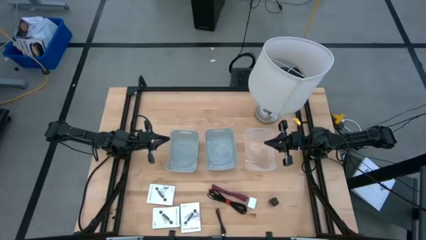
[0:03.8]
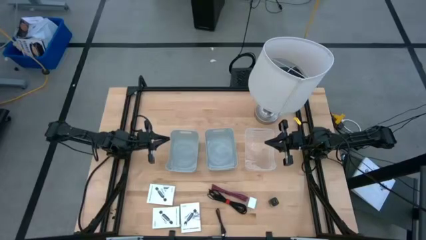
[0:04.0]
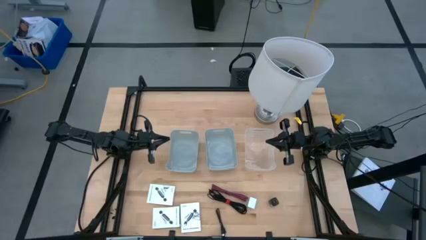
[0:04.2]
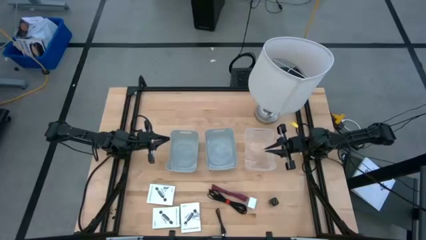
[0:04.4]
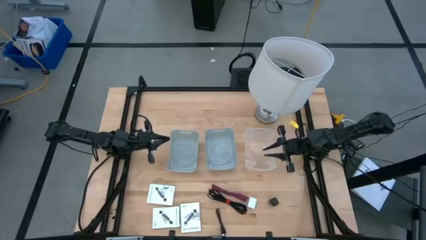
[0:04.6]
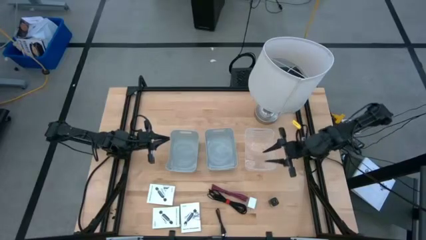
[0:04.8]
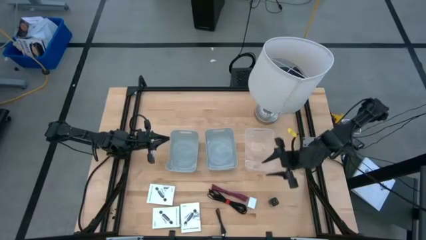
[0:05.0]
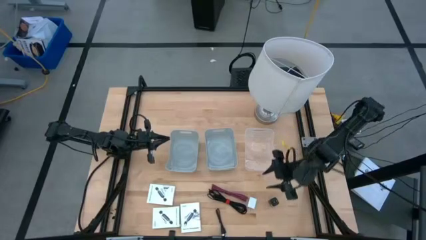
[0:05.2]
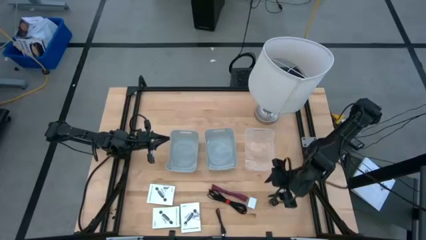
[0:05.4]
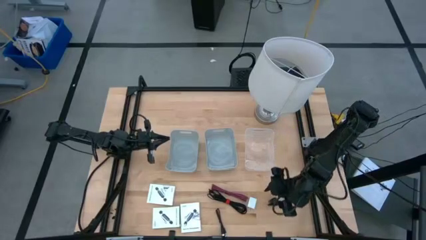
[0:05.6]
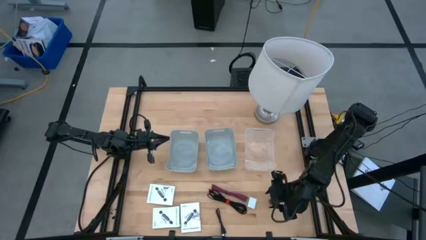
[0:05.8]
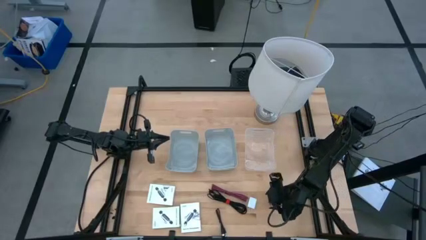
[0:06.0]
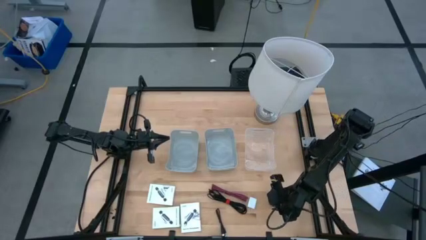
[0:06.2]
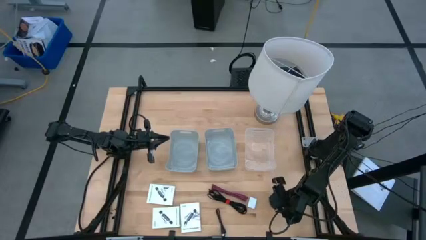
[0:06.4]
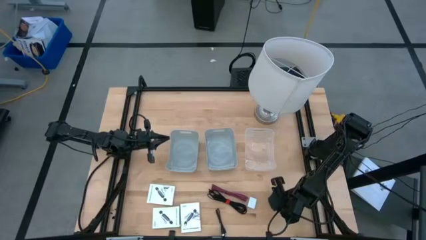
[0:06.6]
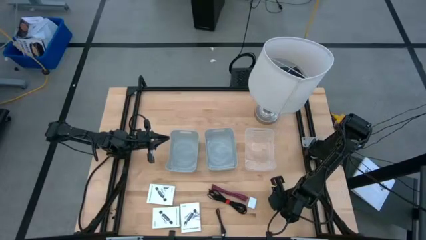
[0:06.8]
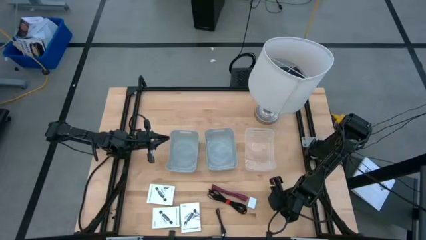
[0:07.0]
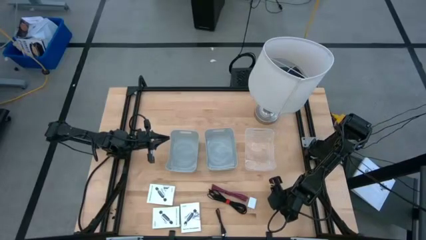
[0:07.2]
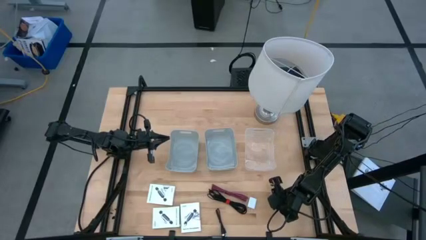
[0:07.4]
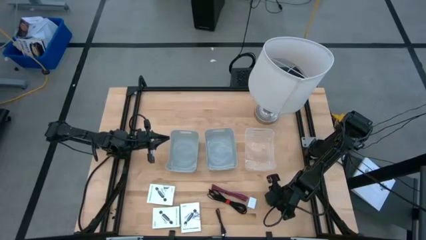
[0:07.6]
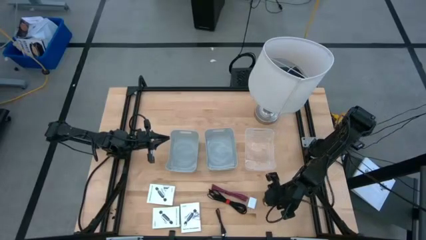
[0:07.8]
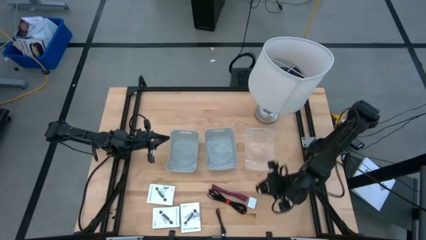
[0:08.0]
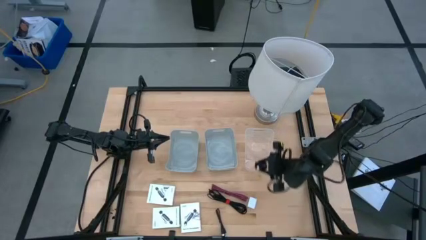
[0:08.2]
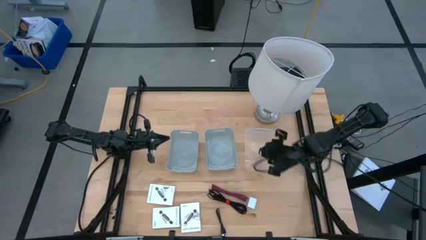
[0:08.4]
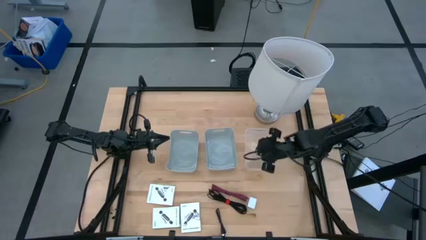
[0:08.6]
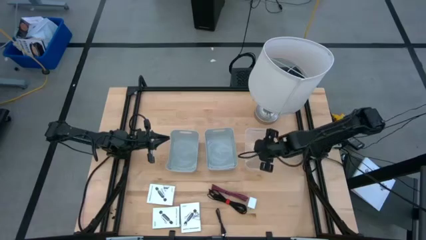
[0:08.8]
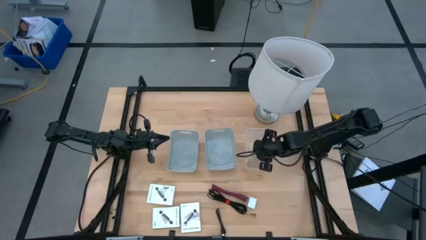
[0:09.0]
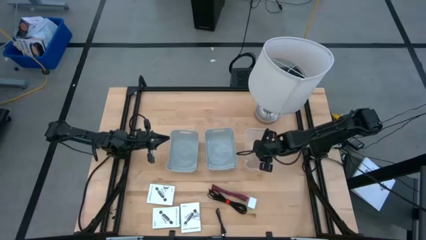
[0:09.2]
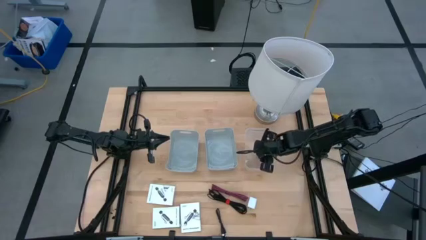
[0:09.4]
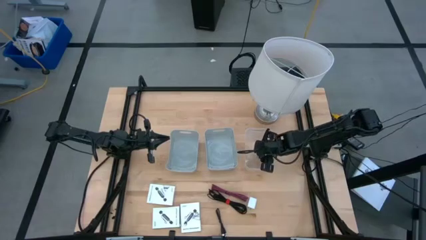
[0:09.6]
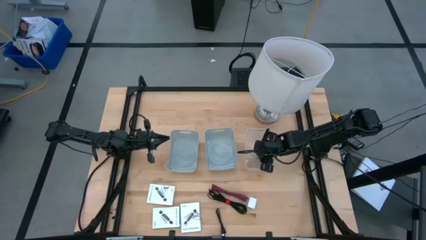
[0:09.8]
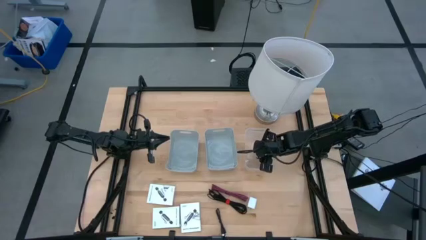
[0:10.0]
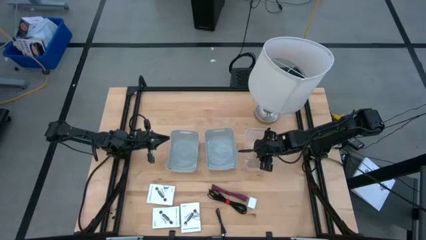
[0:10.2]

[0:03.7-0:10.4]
Task: Pick and place items into bin
Put the black charger adapter into the transparent bin

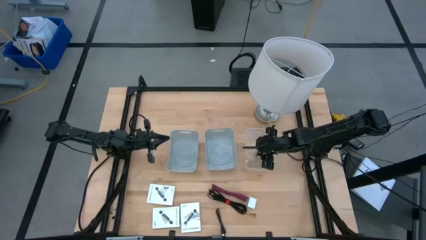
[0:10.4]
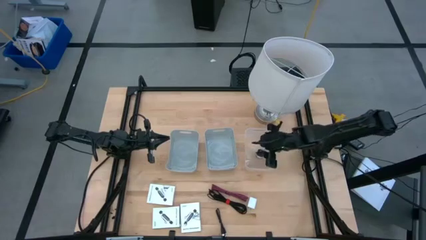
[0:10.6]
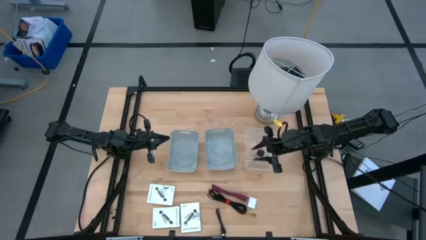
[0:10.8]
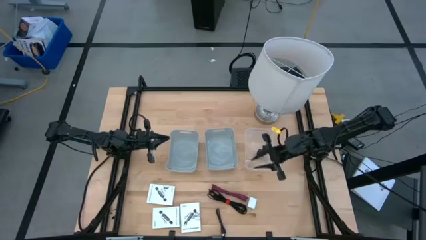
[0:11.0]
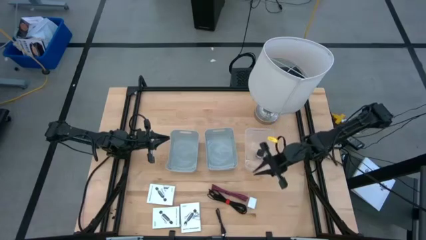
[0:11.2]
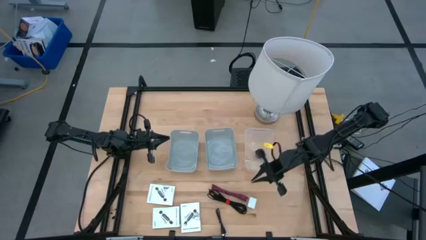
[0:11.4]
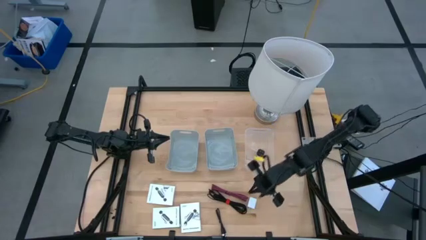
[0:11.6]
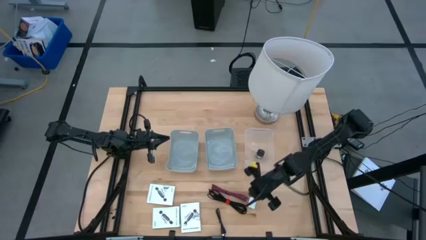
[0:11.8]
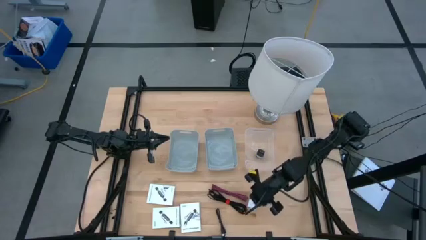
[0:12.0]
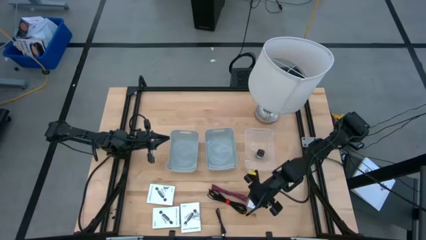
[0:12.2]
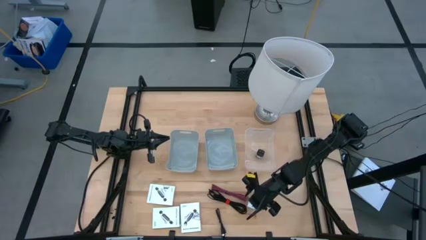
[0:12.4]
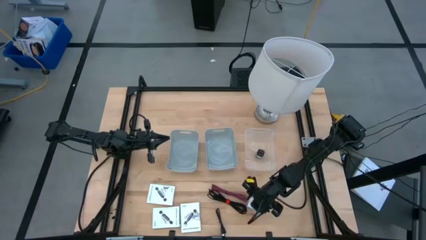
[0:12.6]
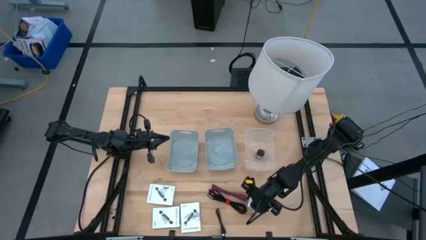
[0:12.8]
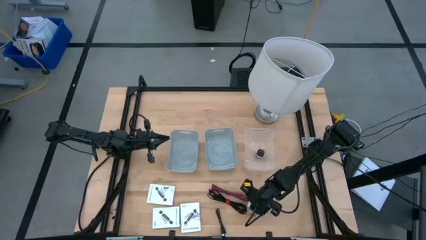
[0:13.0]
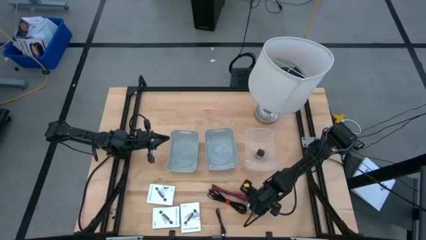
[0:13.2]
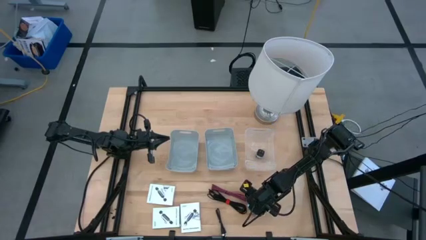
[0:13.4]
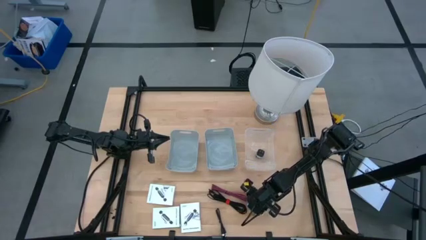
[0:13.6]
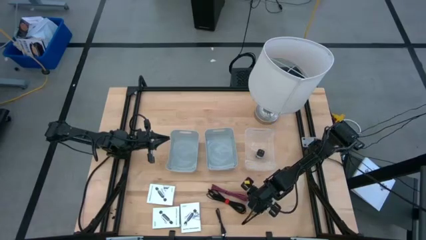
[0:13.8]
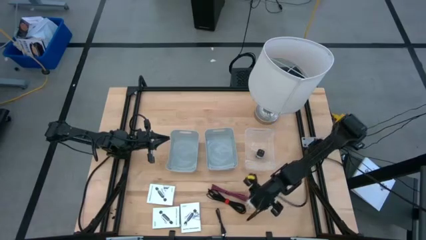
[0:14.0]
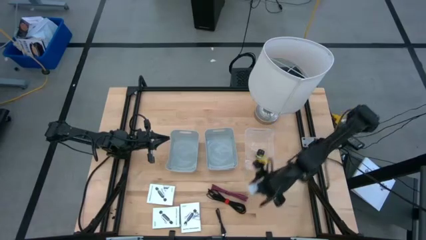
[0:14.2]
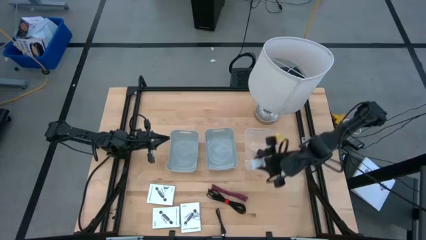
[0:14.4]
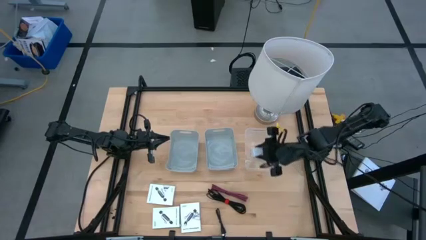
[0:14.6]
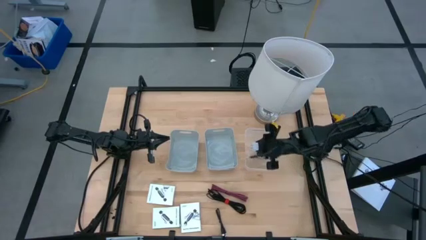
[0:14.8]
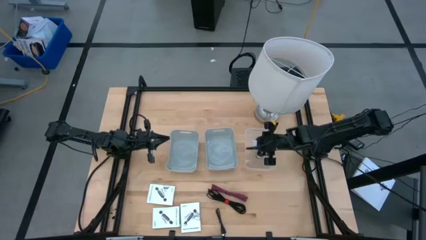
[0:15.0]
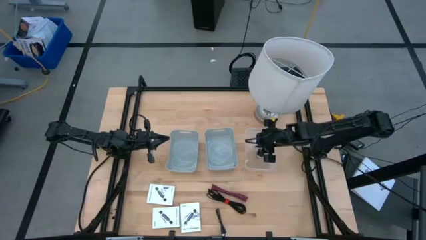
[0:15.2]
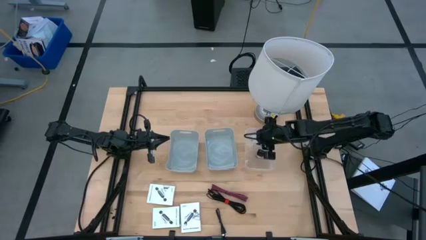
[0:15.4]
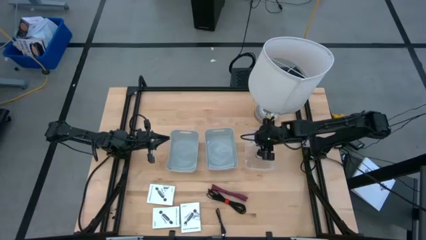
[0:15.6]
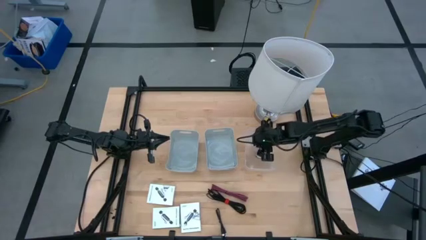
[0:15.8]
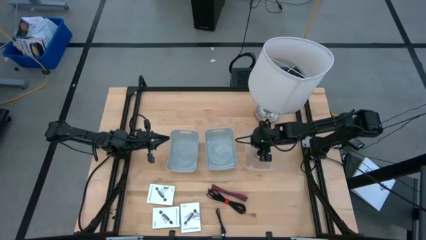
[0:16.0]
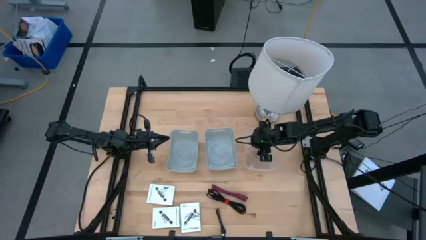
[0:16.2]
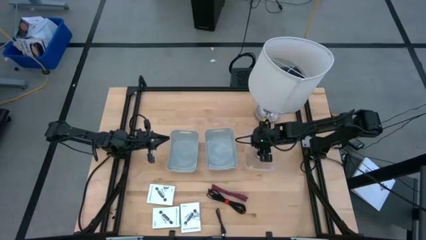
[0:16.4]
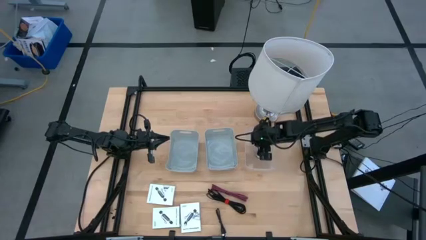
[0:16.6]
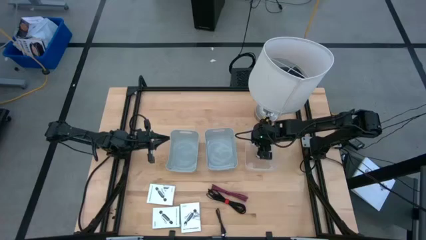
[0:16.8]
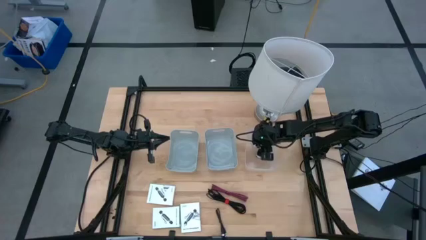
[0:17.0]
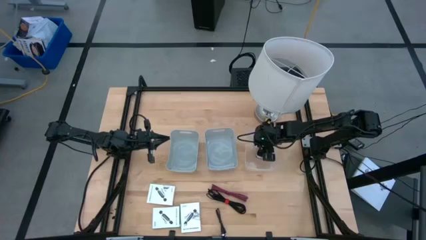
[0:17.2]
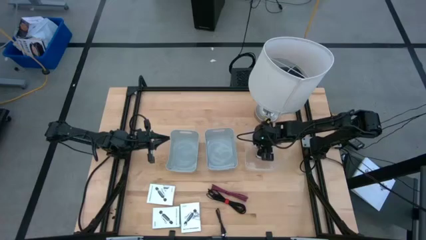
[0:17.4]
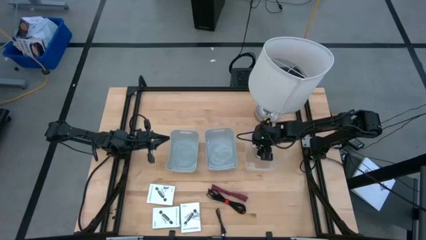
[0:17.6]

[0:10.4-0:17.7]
Put the white charger adapter into the transparent bin

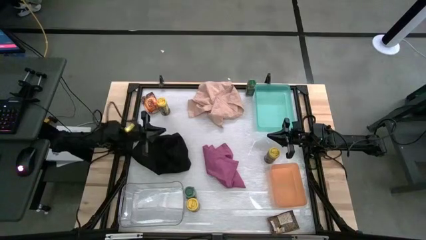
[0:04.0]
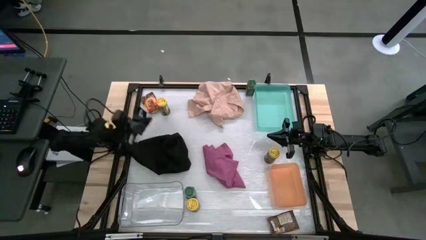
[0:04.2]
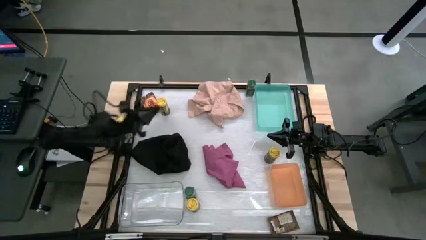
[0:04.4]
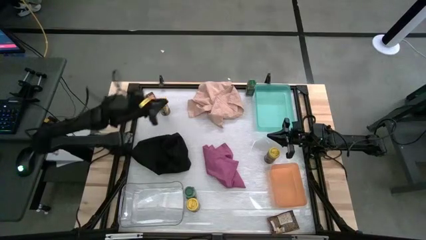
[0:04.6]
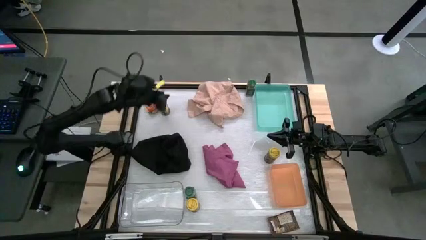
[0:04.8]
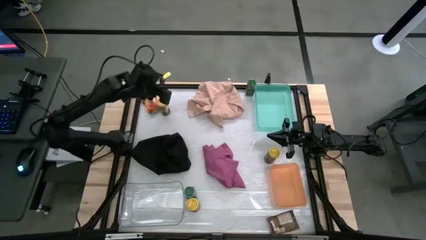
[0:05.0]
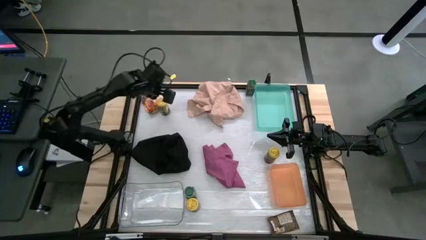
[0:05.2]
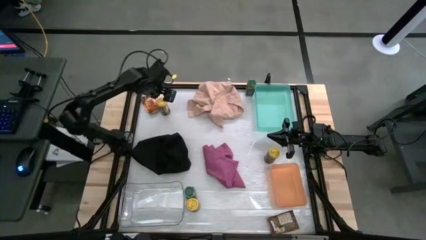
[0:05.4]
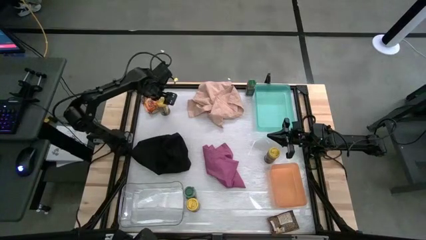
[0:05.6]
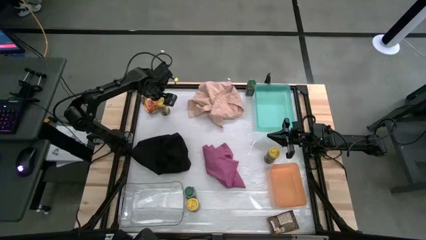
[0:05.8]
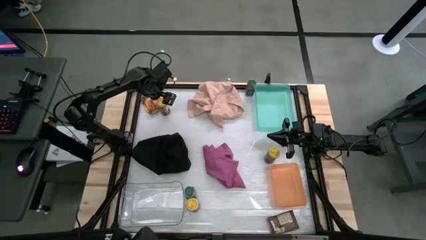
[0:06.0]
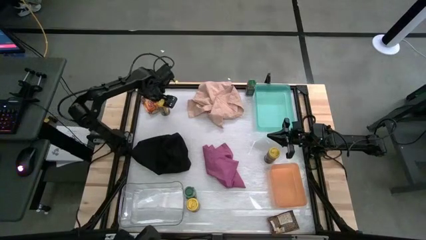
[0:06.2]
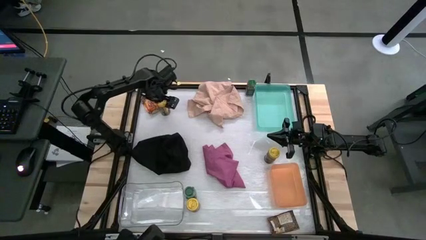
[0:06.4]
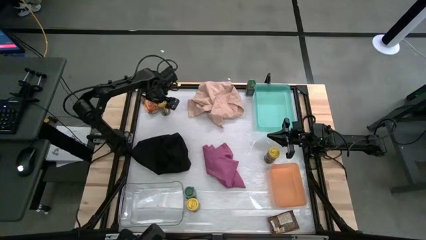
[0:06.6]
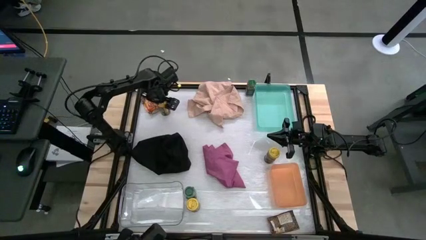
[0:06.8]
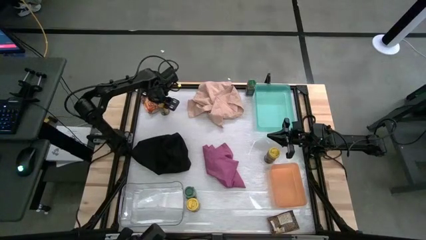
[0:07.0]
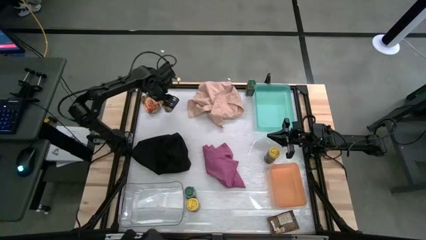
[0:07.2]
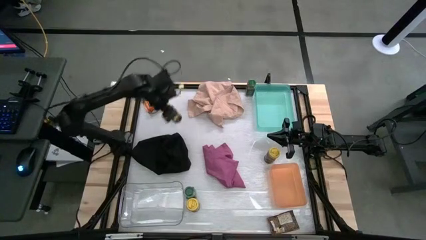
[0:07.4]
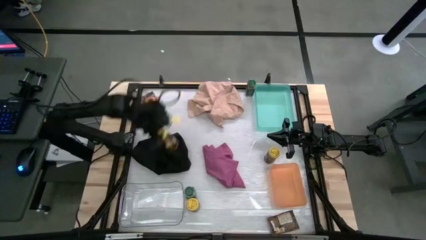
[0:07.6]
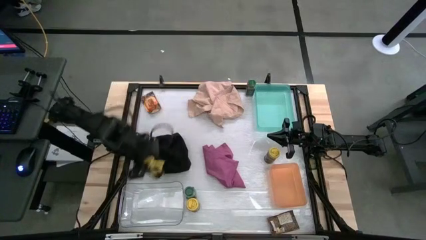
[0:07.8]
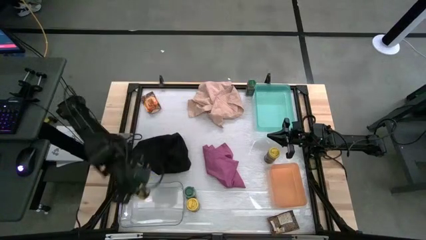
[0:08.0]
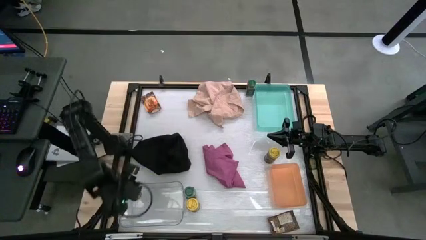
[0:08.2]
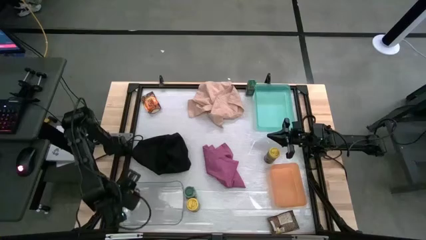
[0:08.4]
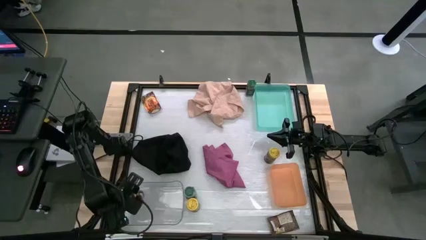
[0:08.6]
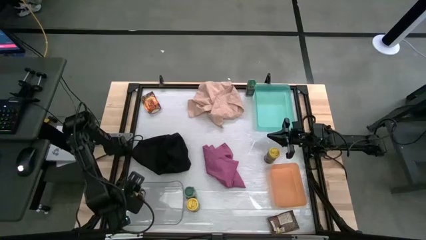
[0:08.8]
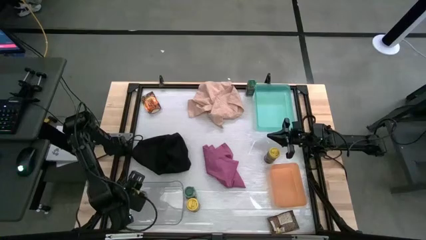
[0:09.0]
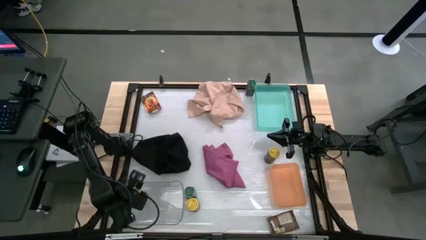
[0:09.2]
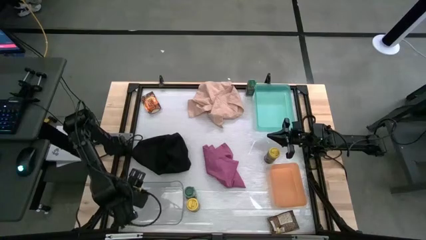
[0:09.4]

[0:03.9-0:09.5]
Task: Sort spices by type
Put the top yellow seasoning bottle into the transparent bin
